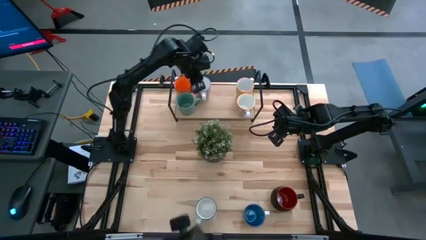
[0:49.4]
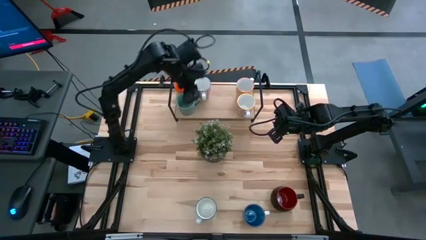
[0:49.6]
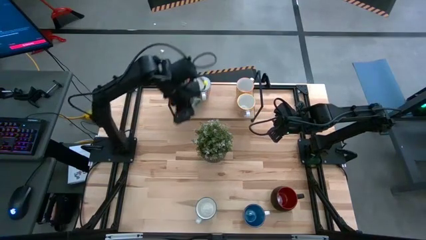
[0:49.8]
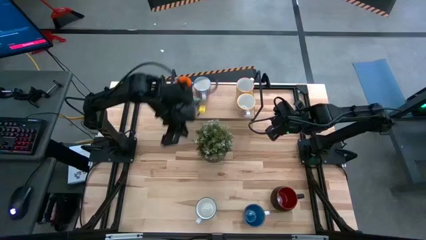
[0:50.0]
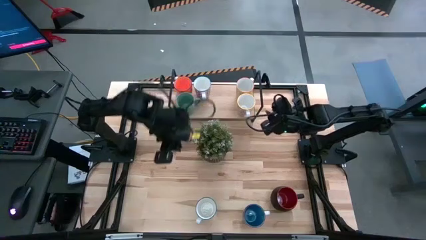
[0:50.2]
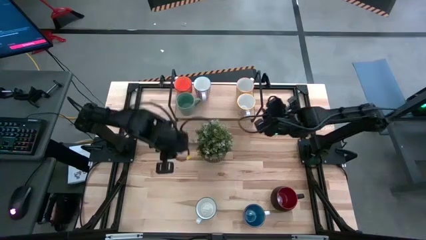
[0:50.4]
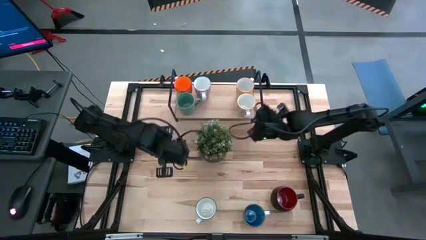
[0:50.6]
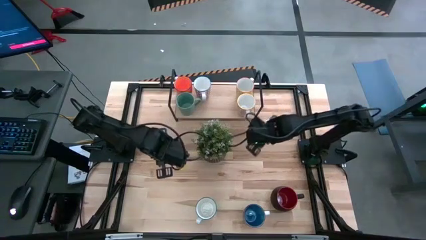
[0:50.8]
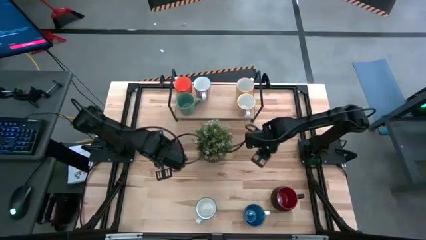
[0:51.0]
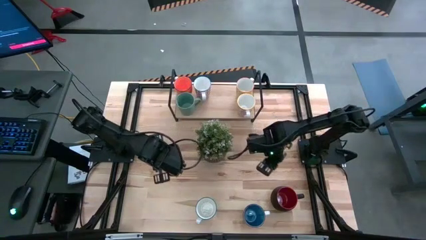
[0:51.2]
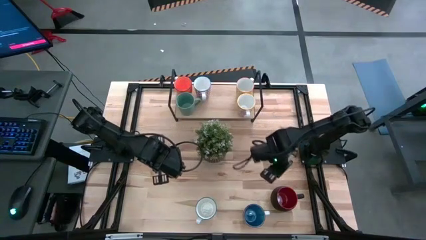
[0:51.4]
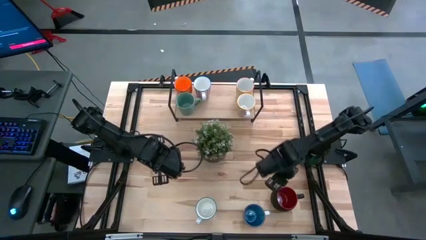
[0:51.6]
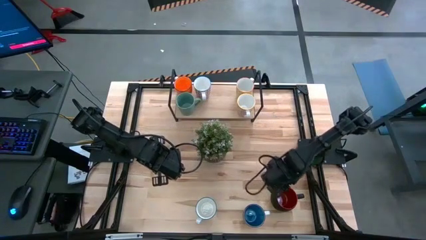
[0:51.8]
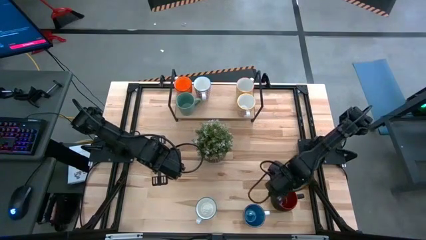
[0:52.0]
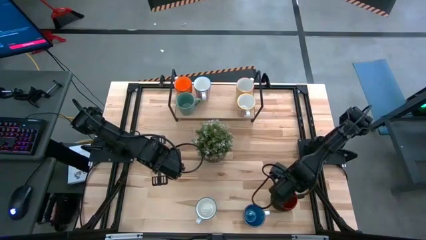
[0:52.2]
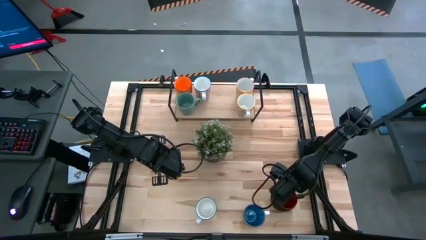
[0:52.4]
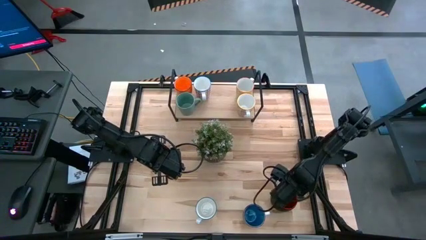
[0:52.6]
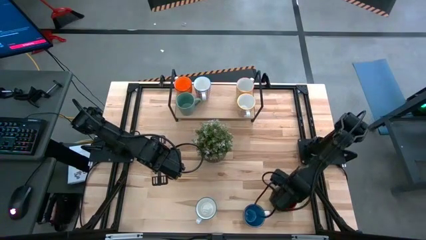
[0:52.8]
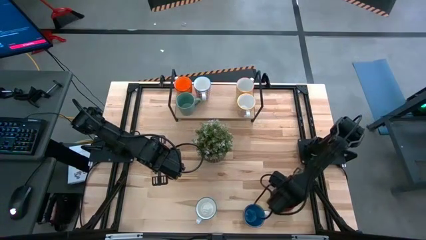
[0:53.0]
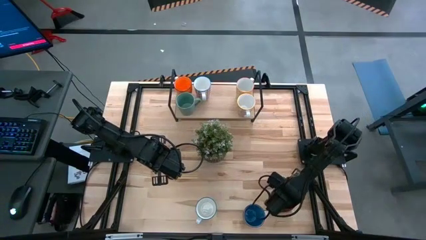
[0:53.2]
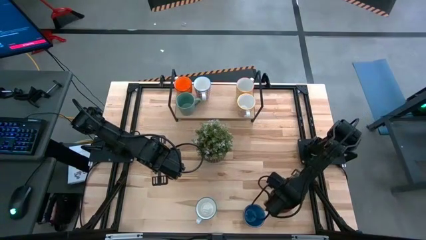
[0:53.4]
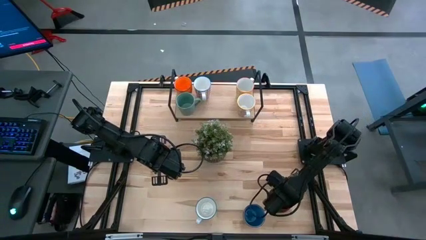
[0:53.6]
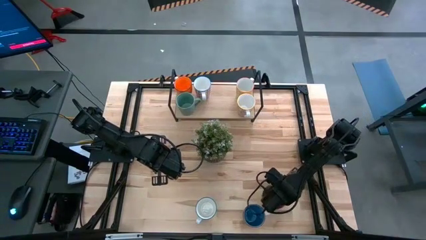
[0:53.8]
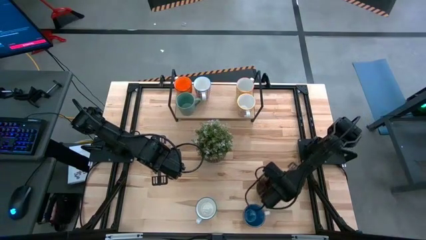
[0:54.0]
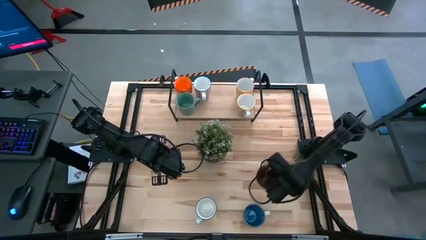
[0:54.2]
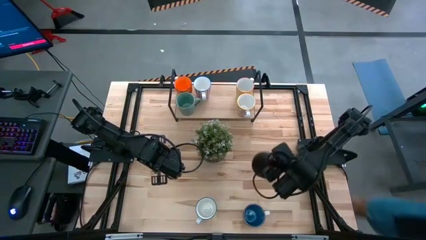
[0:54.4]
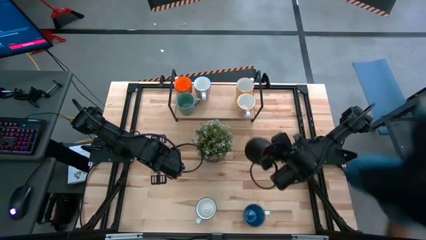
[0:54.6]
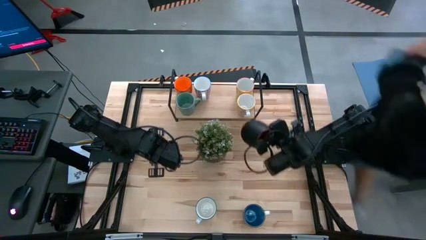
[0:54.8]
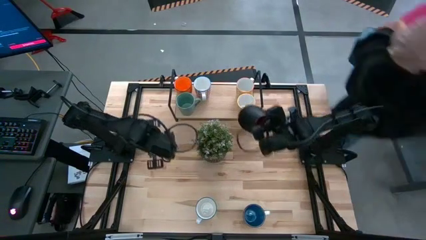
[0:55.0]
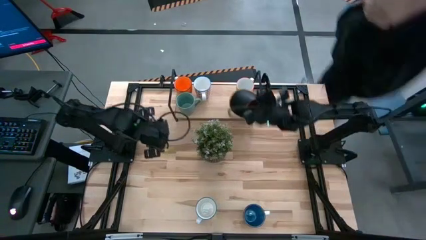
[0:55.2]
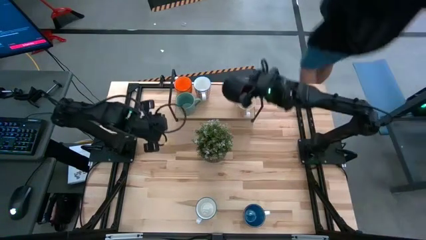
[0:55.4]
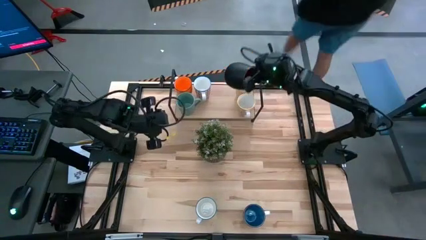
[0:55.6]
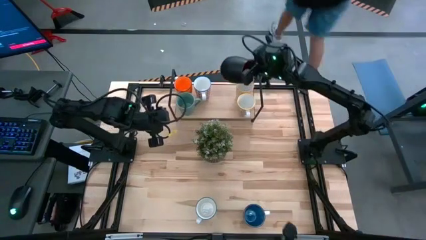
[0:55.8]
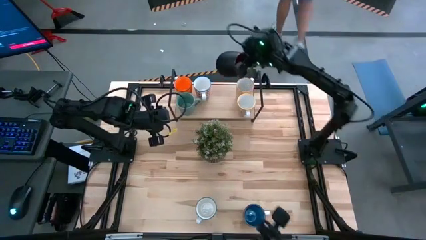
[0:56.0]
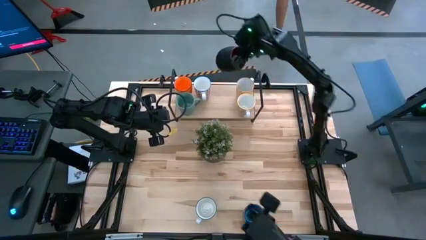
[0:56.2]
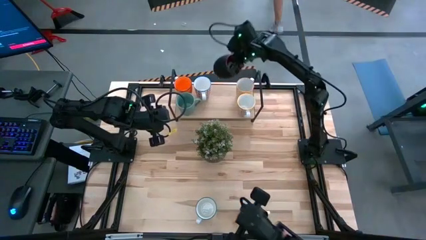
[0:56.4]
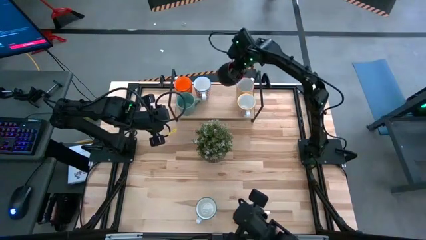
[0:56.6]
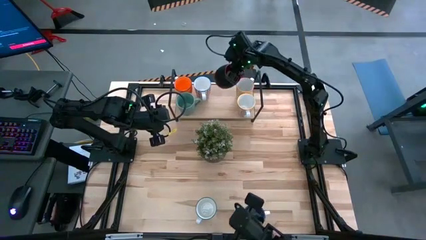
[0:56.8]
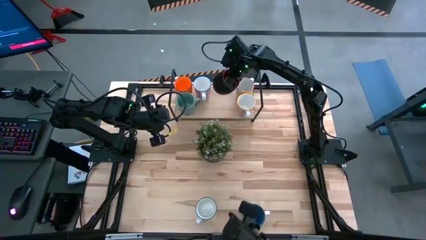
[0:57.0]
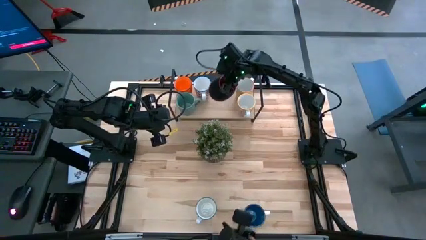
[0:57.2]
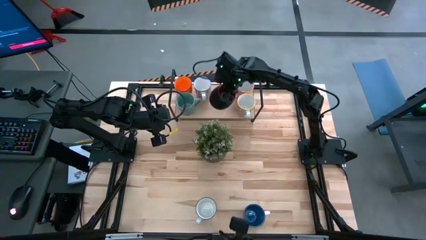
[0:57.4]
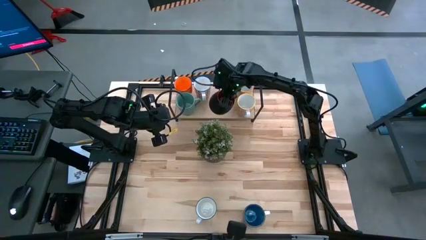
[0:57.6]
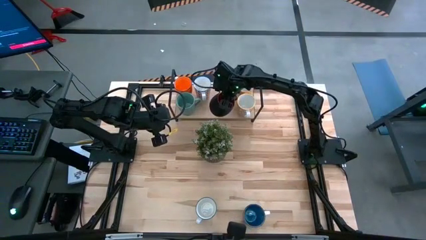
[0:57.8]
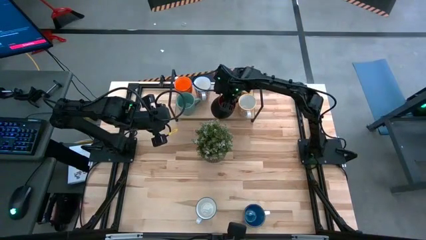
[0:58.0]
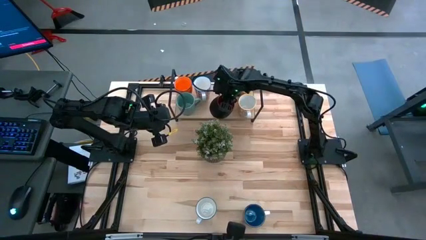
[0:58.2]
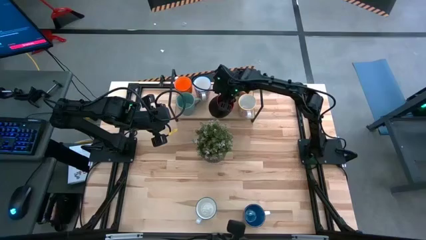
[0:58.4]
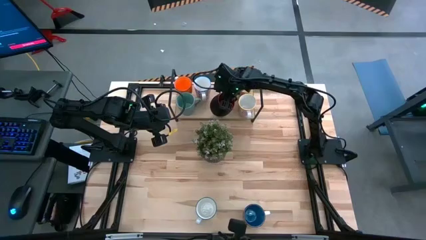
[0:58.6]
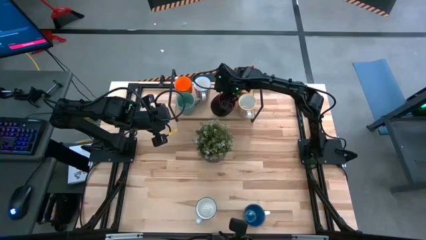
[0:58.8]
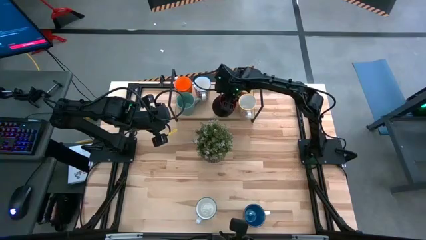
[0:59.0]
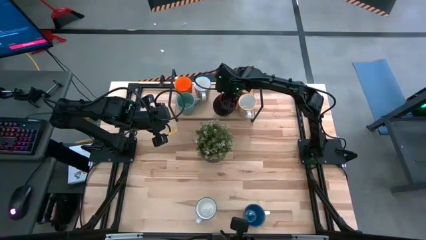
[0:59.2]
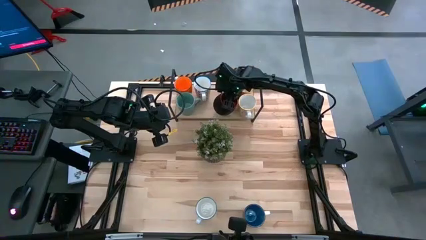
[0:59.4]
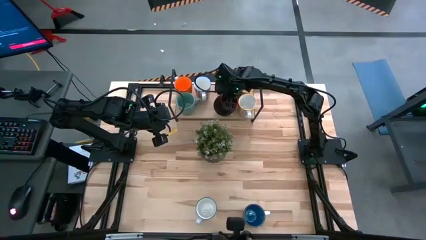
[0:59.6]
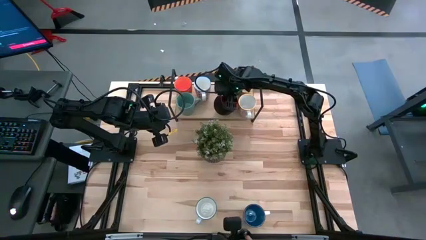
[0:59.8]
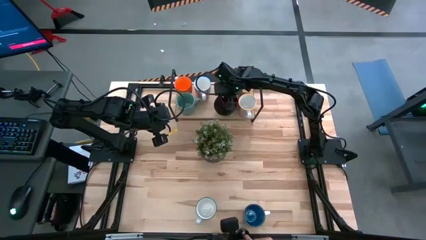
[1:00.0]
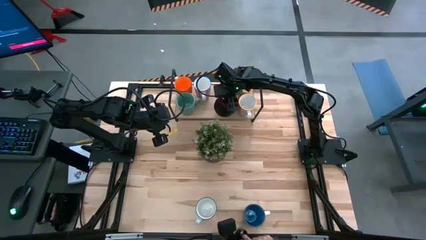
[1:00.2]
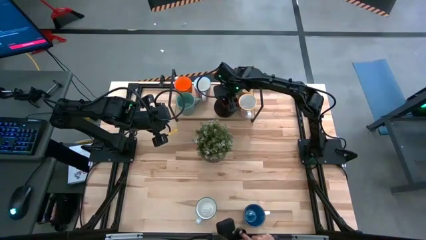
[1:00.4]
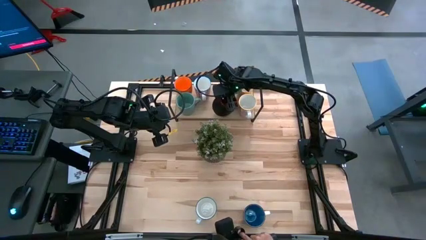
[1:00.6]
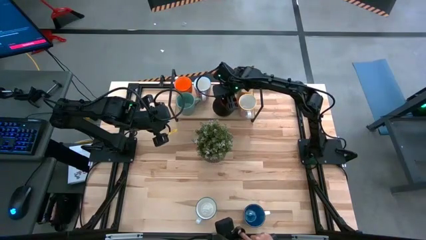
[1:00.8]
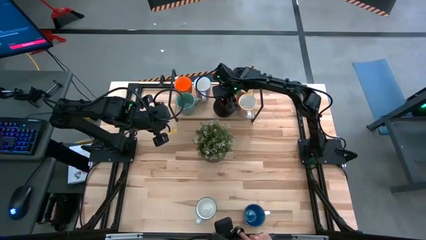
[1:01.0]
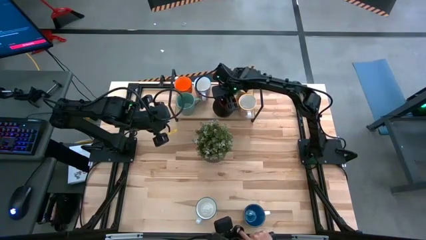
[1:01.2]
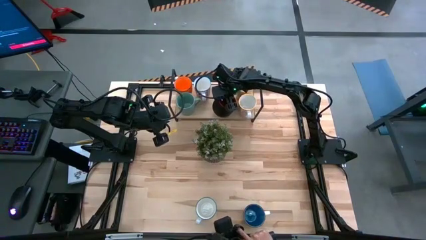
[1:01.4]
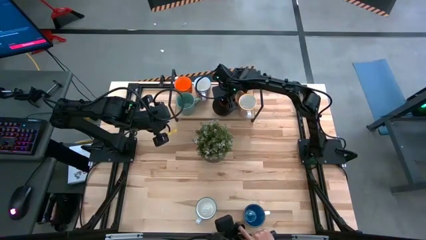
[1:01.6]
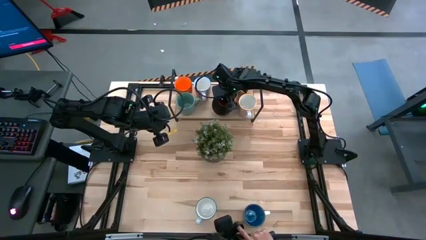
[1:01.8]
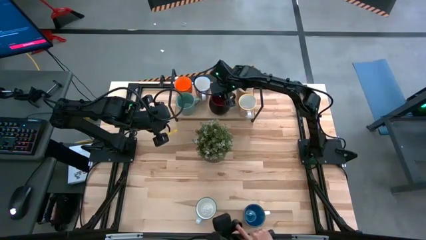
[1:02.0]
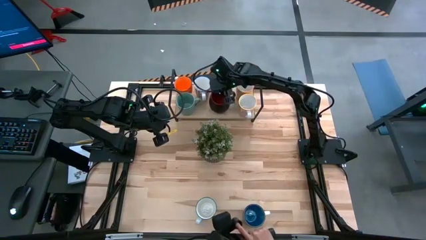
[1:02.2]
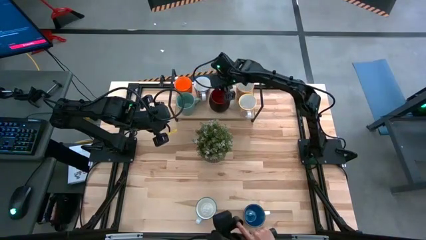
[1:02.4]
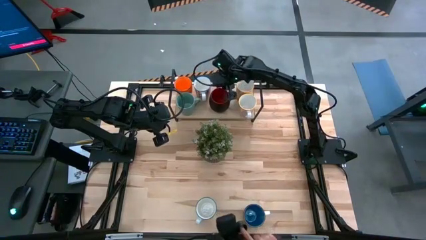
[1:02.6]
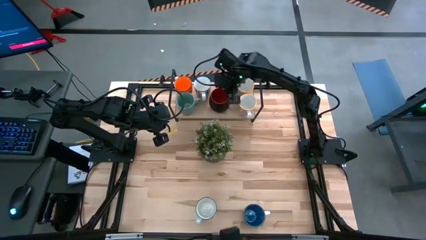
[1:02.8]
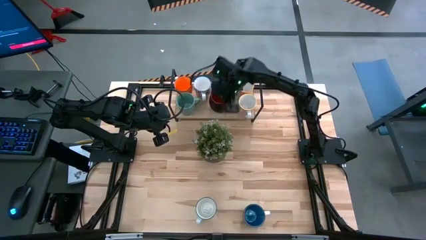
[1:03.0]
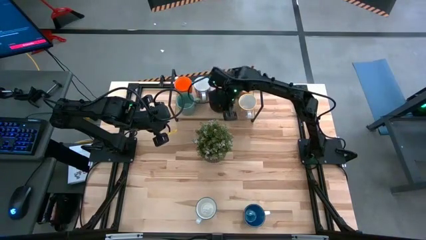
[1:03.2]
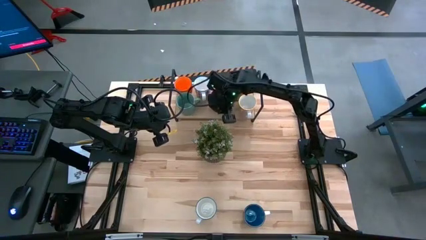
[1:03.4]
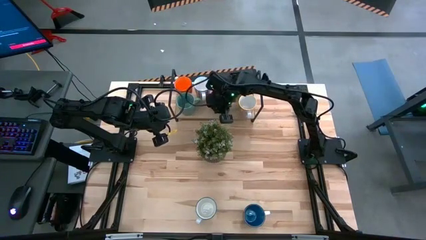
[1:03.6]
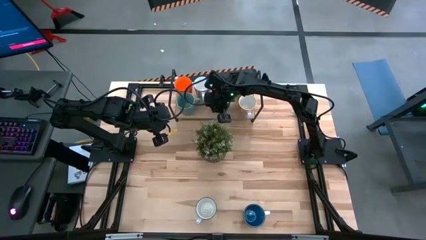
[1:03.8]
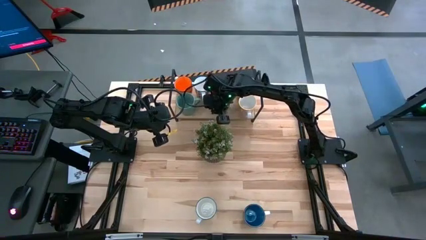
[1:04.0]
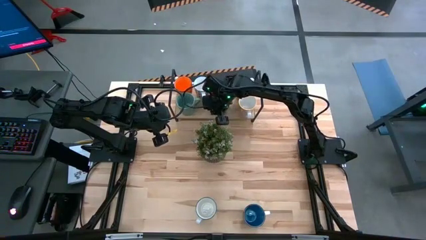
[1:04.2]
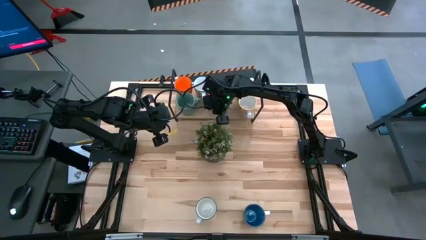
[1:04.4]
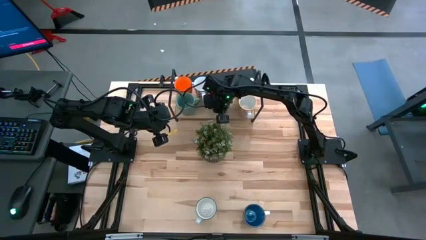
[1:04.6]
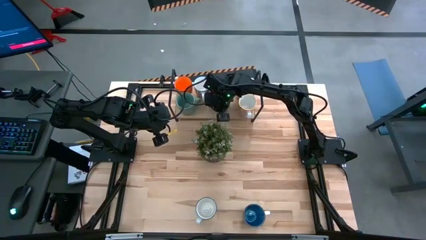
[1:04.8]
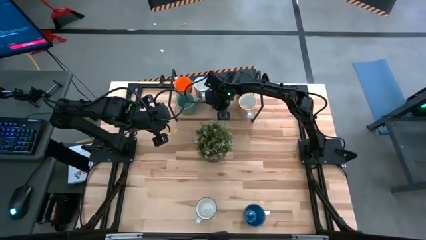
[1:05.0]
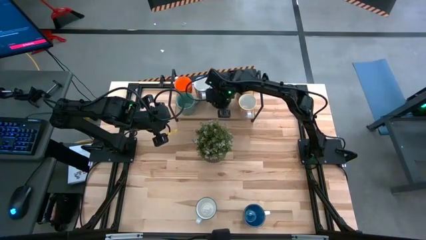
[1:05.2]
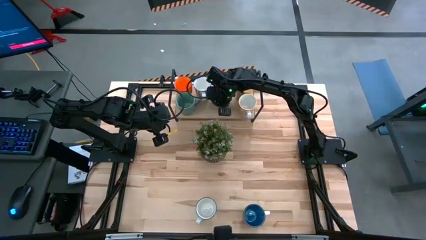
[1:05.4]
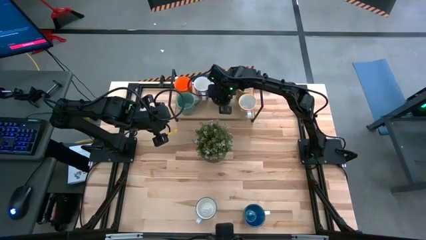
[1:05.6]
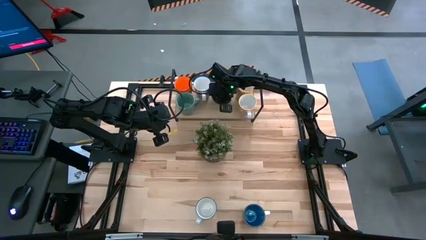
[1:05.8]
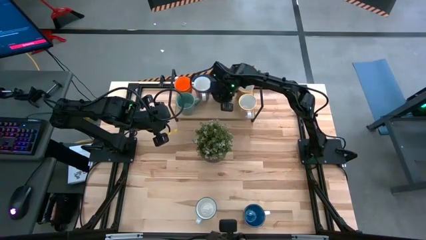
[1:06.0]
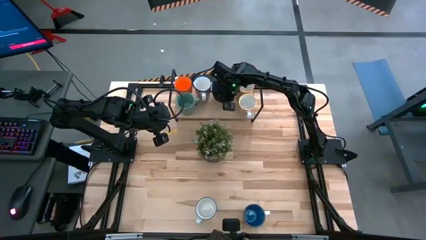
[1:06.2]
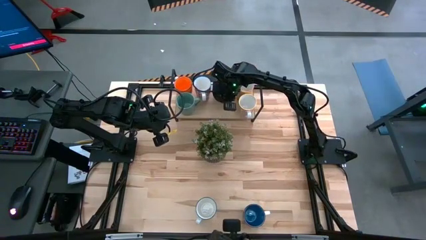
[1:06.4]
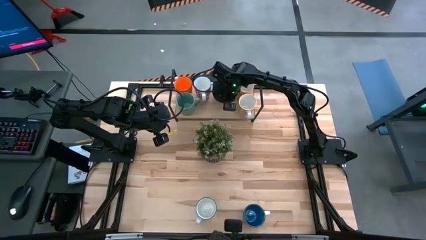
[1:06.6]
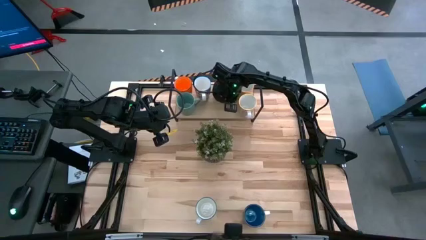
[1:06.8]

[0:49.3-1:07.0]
Task: Place coffee mugs
Put the black mug on the shelf
